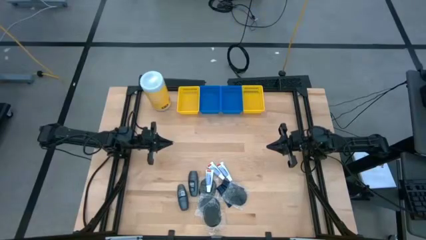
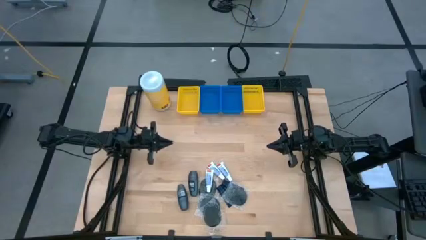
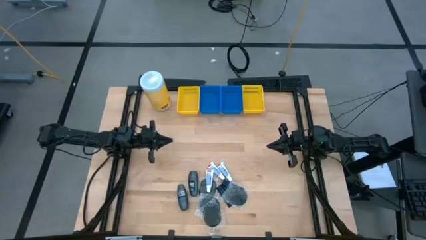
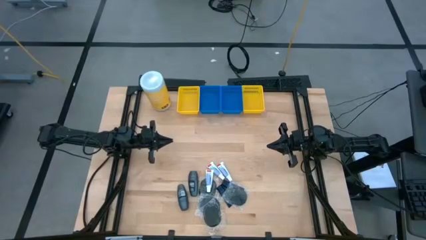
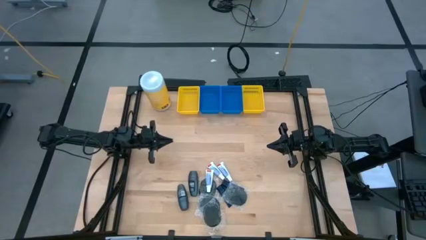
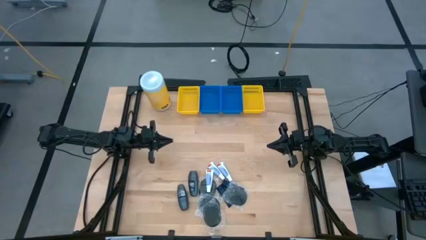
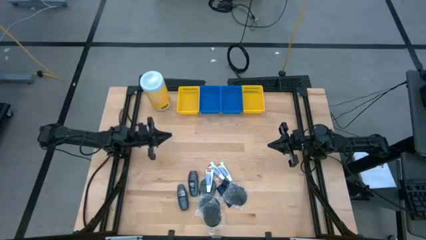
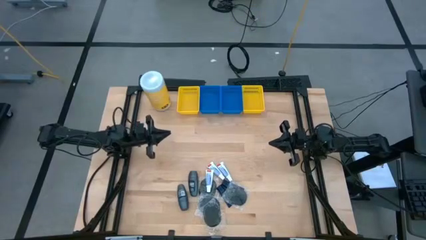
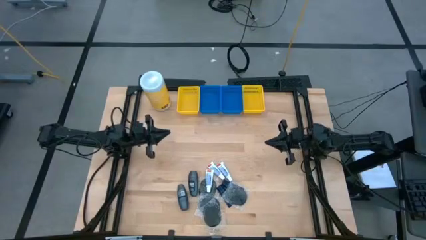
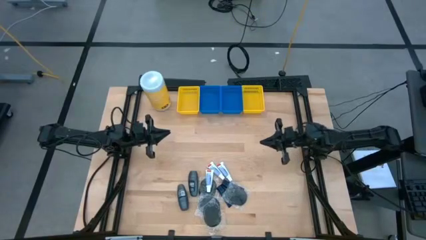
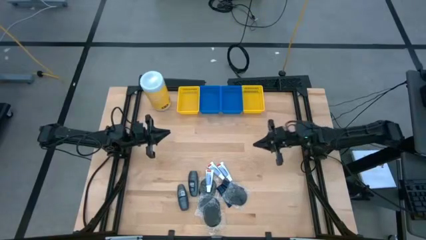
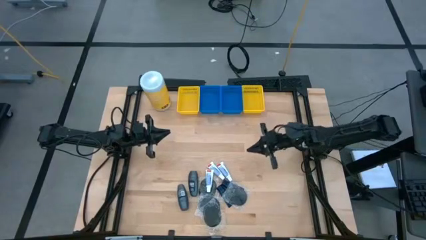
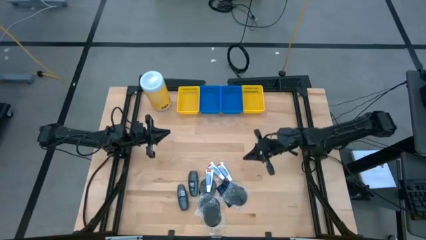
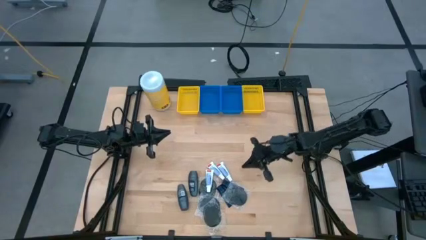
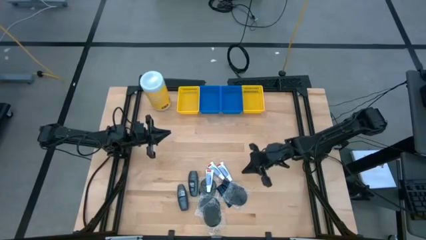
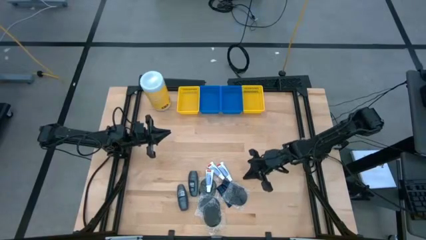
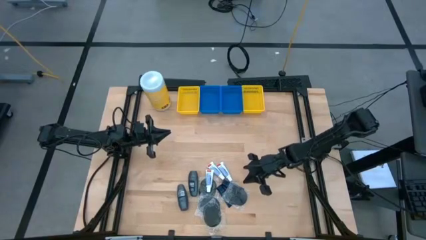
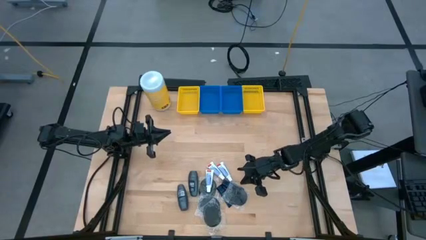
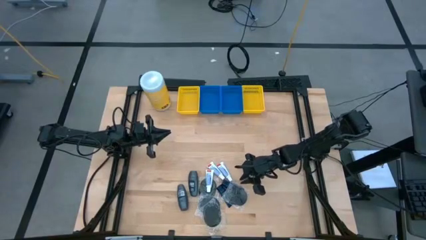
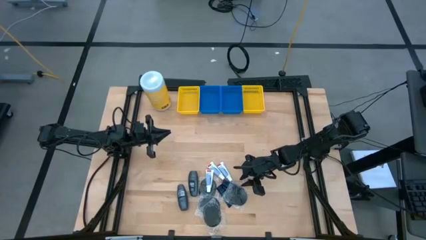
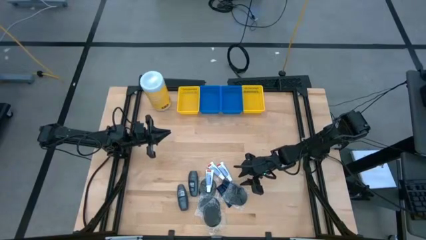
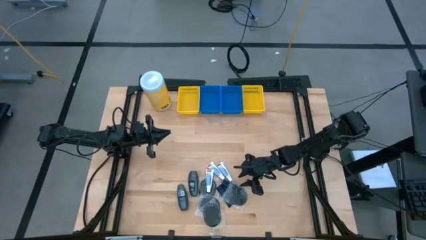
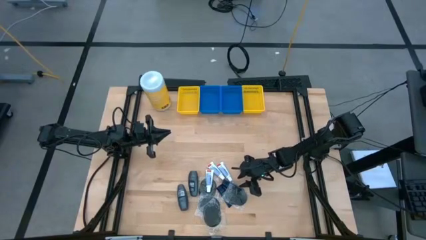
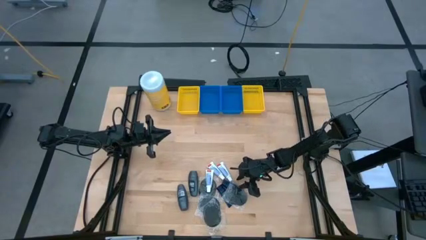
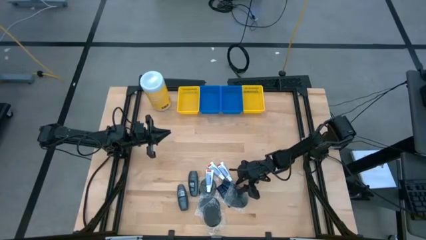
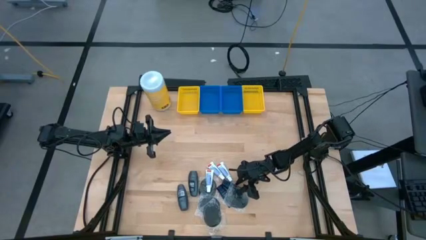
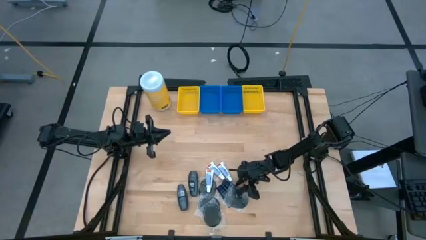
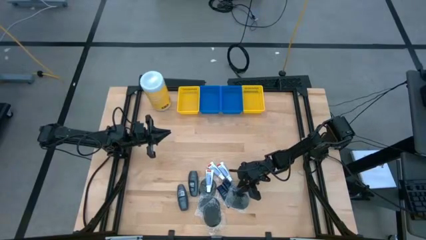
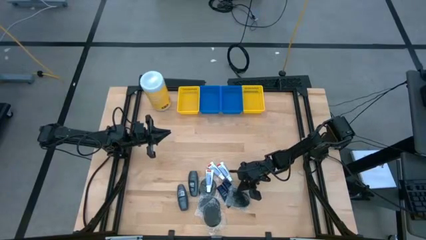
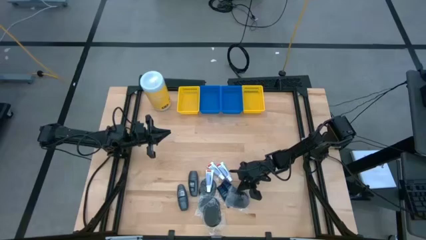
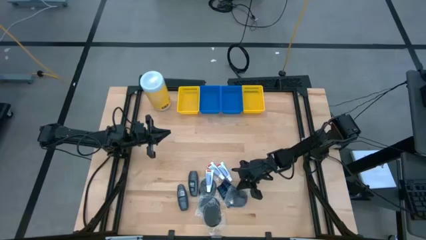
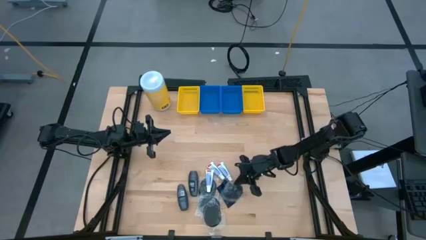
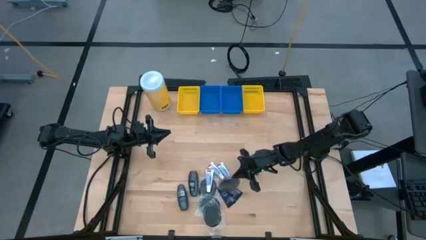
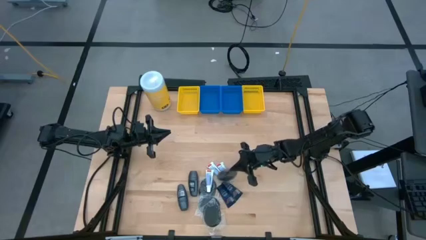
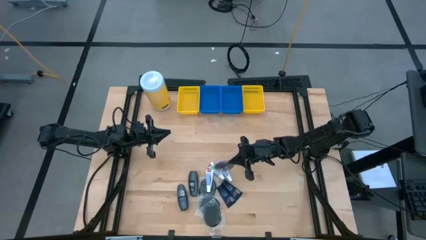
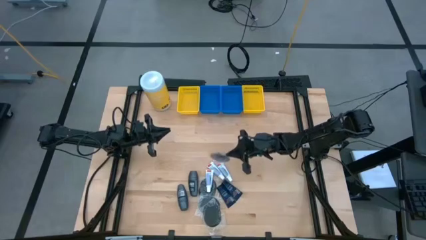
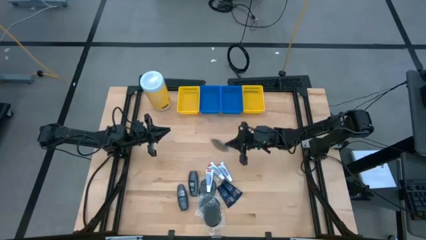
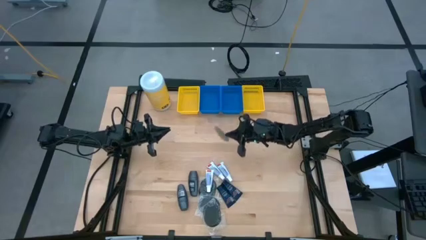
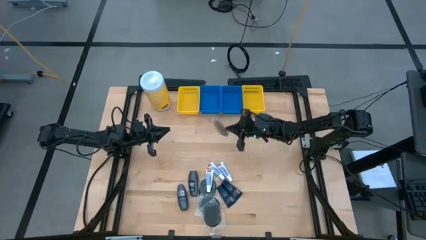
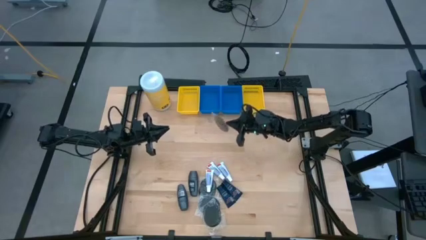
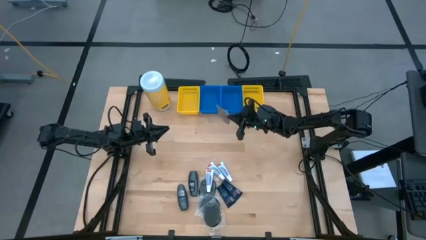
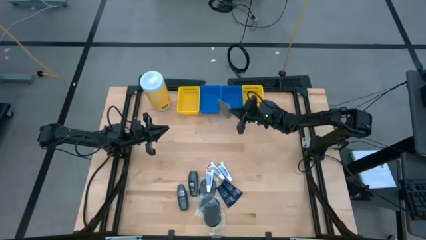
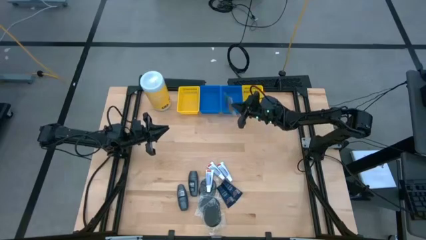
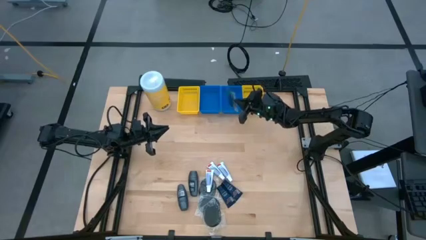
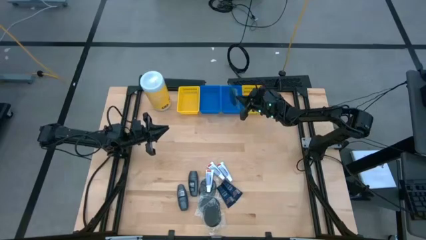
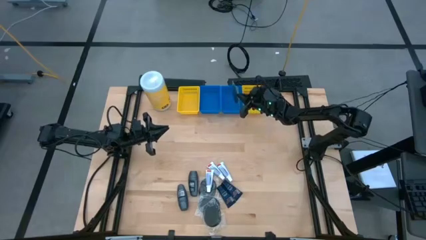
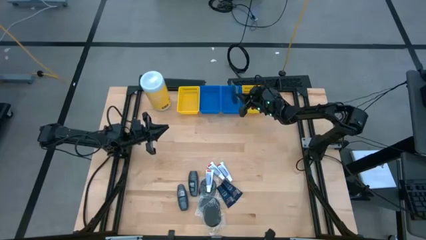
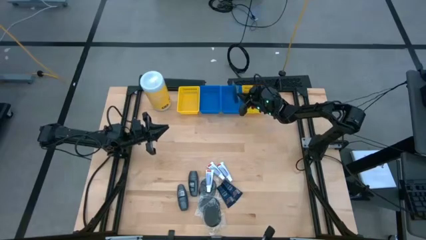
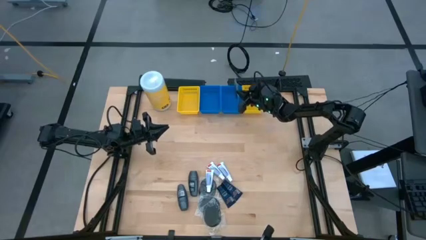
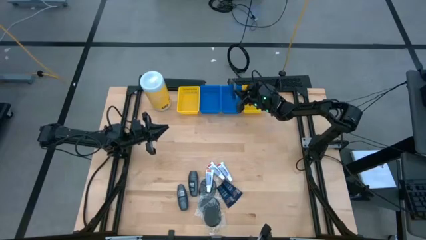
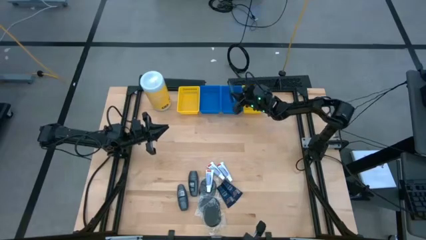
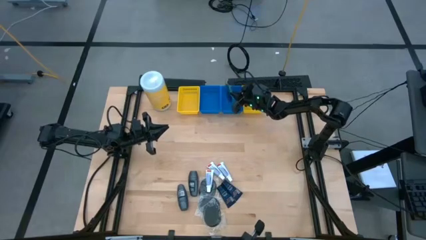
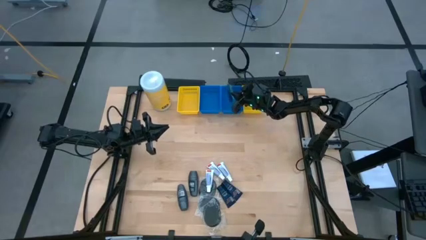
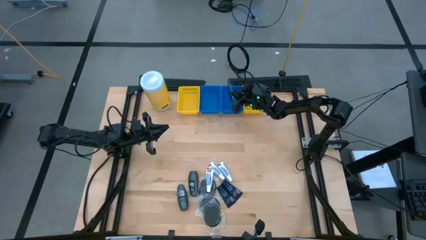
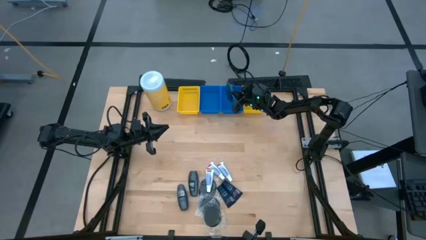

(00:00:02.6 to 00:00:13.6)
Task: Pick & Place Travel size toiletries
Put the hairbrush into the right blue bin
